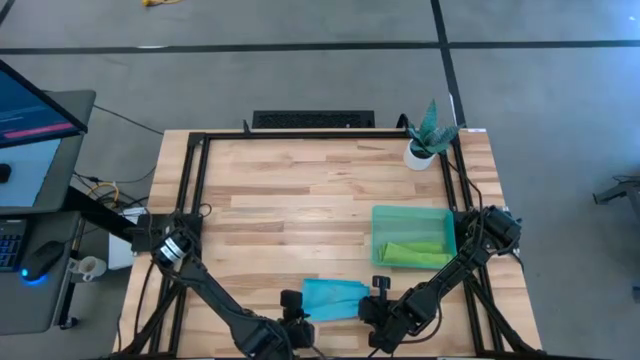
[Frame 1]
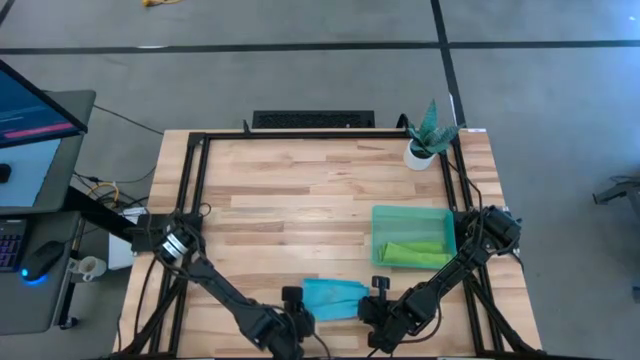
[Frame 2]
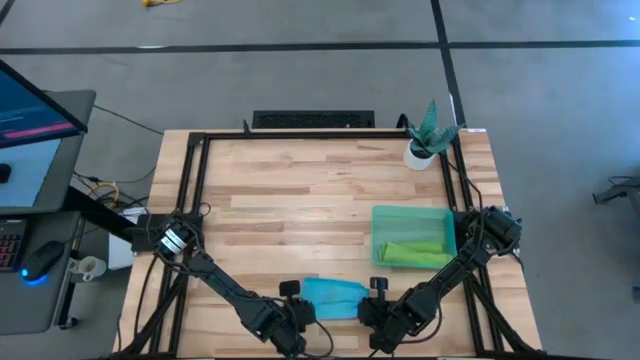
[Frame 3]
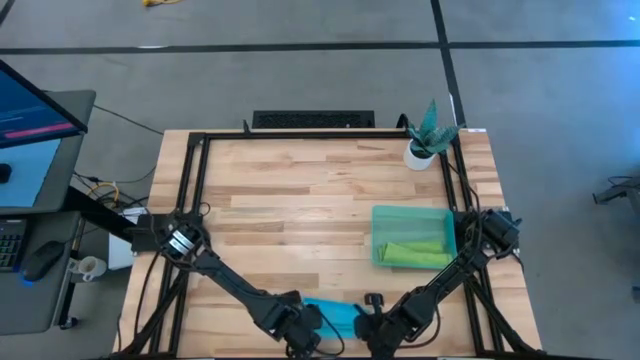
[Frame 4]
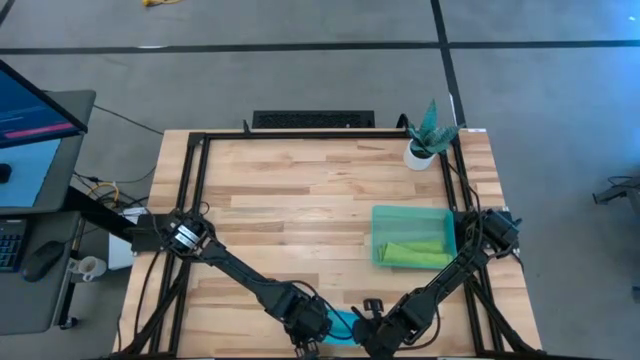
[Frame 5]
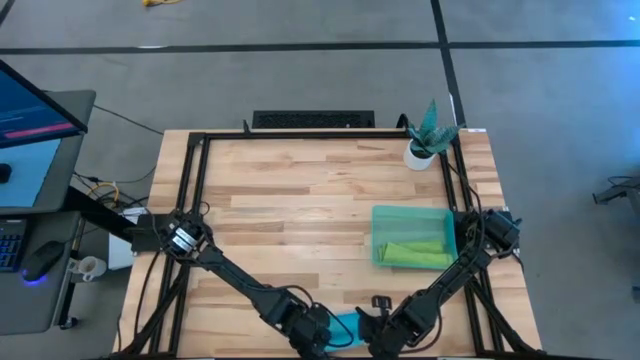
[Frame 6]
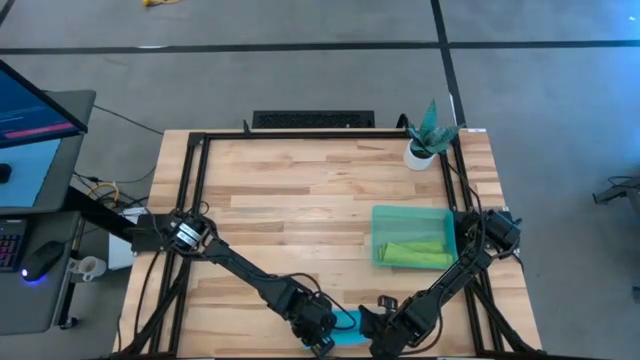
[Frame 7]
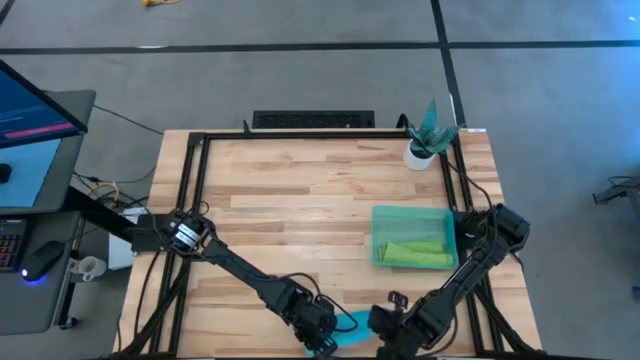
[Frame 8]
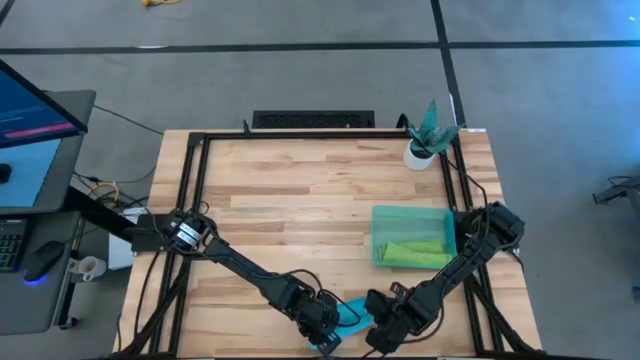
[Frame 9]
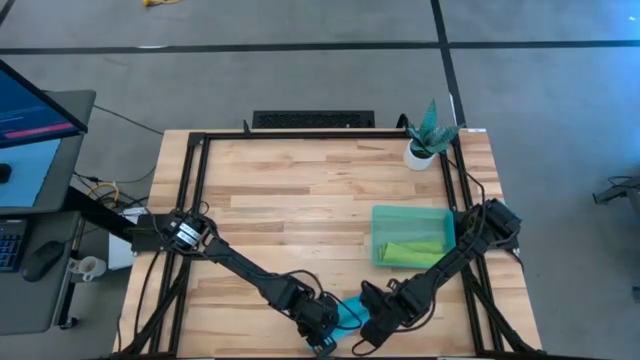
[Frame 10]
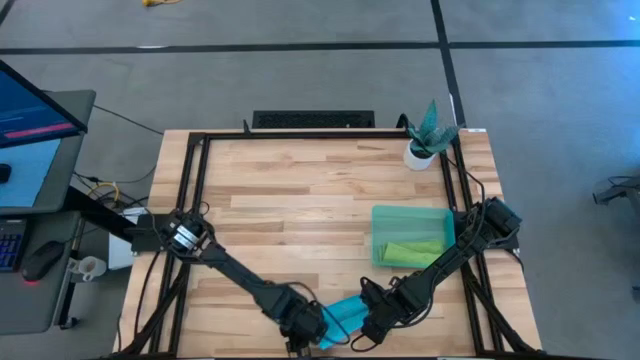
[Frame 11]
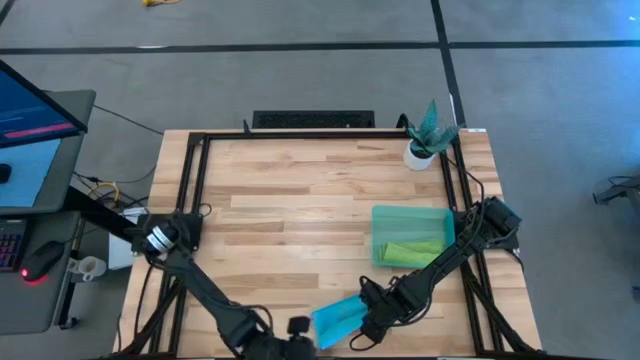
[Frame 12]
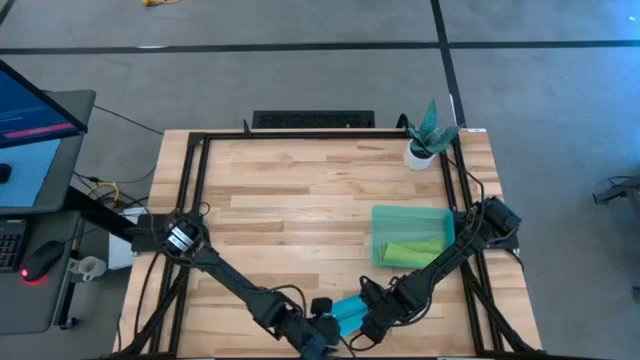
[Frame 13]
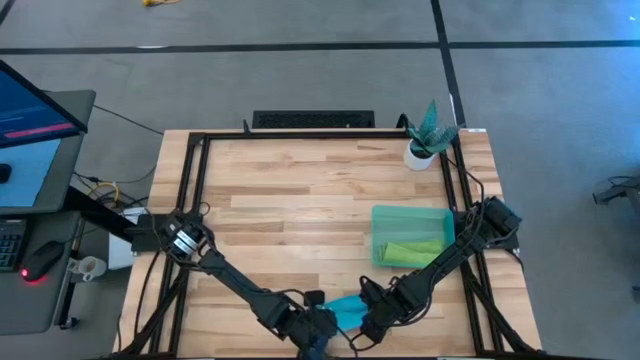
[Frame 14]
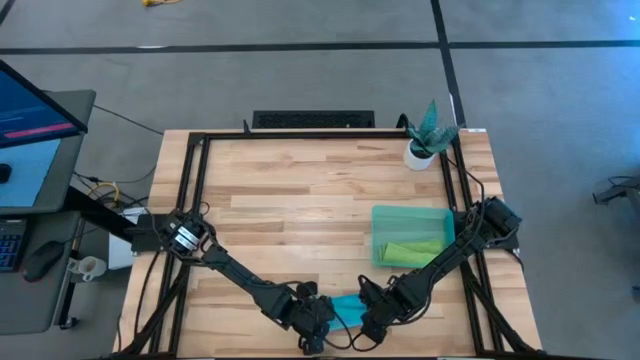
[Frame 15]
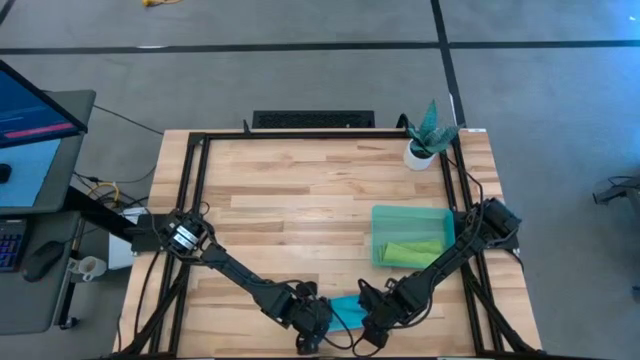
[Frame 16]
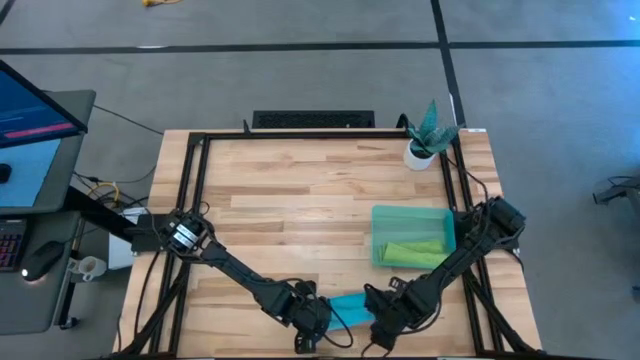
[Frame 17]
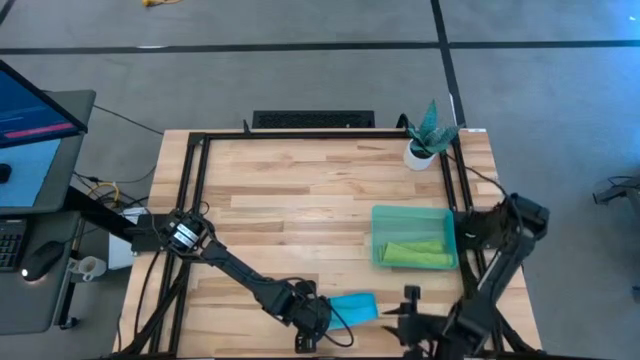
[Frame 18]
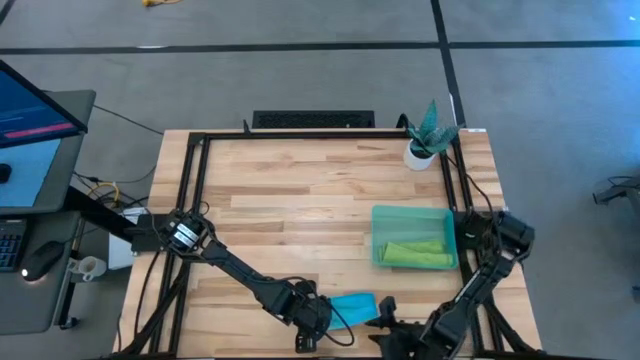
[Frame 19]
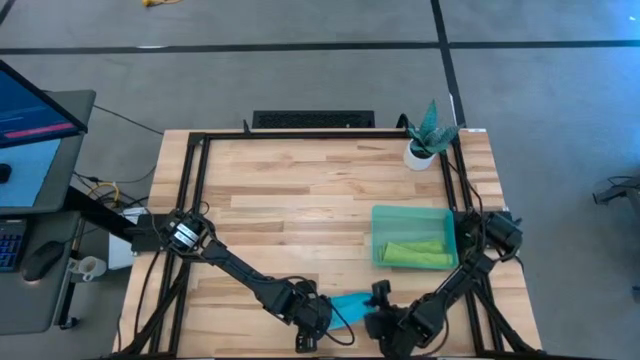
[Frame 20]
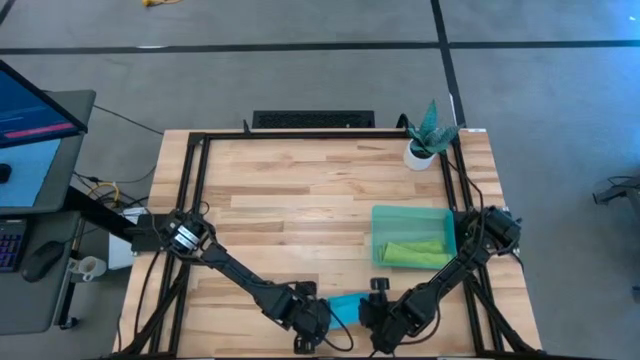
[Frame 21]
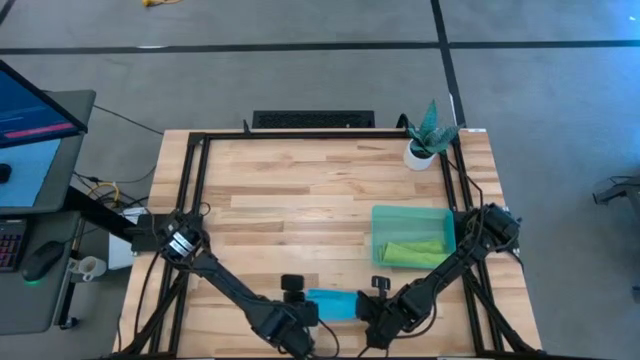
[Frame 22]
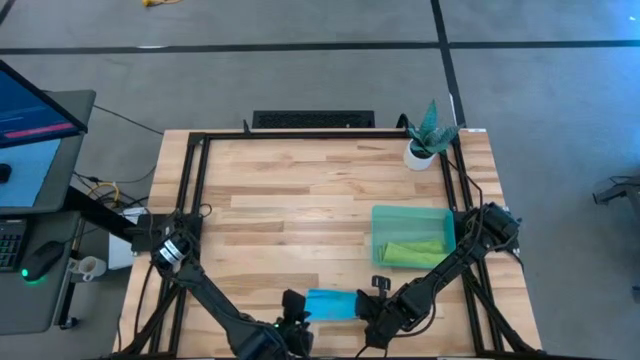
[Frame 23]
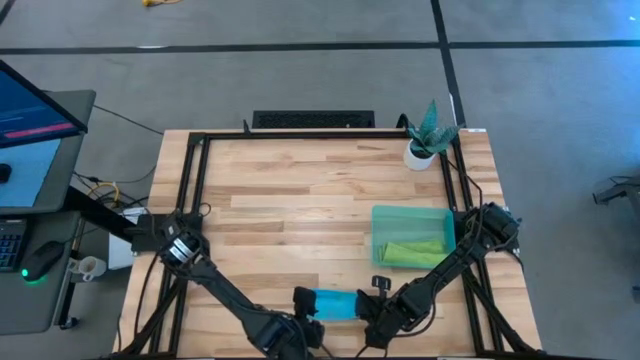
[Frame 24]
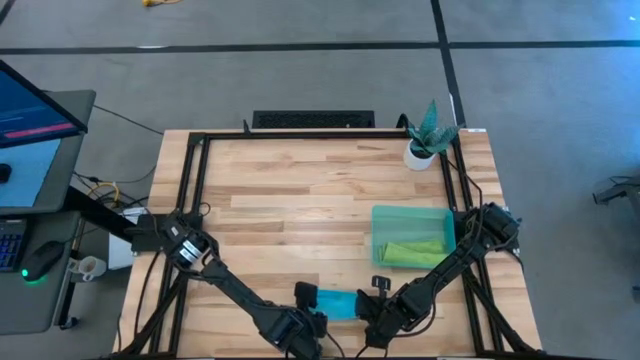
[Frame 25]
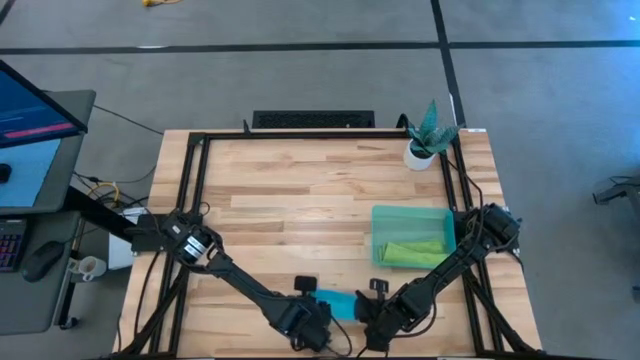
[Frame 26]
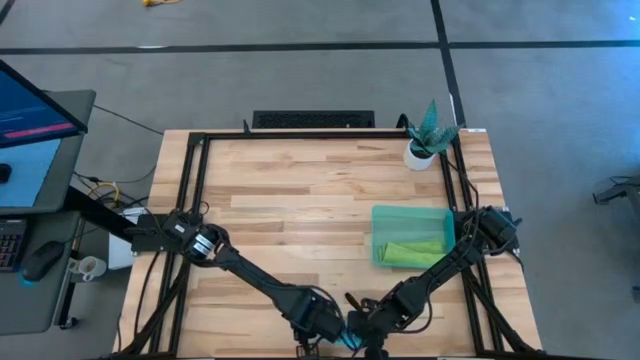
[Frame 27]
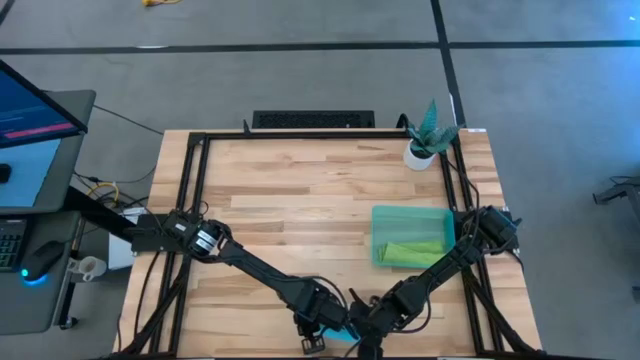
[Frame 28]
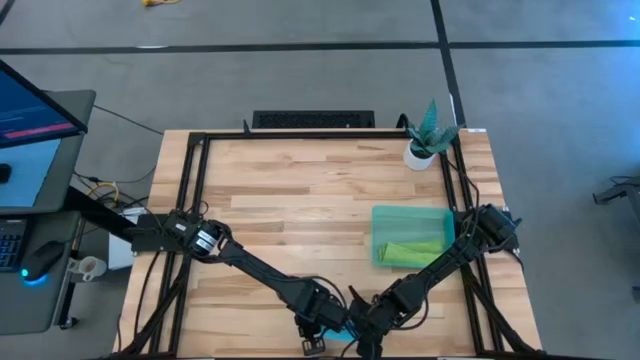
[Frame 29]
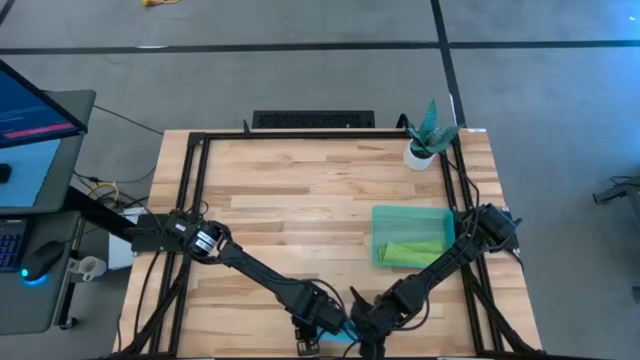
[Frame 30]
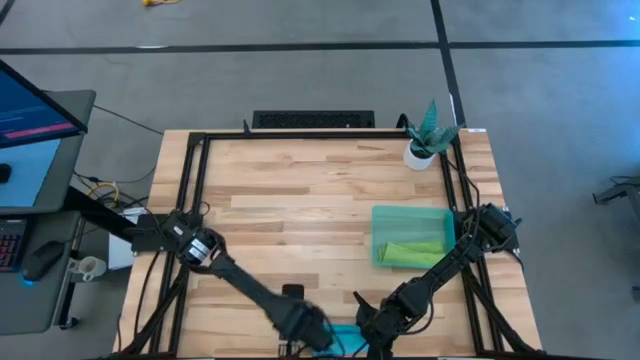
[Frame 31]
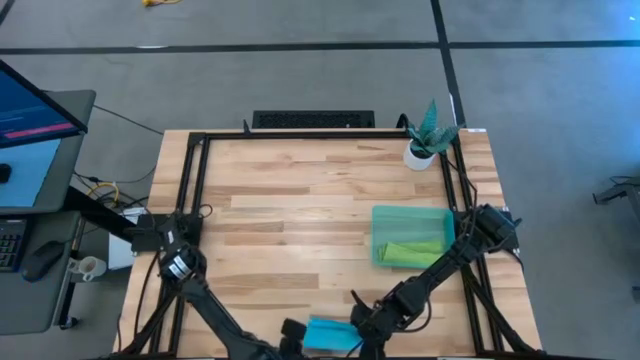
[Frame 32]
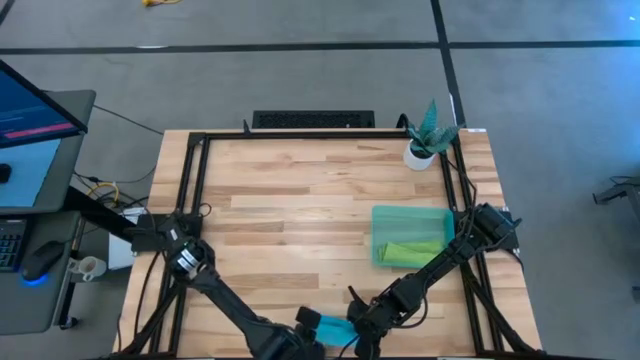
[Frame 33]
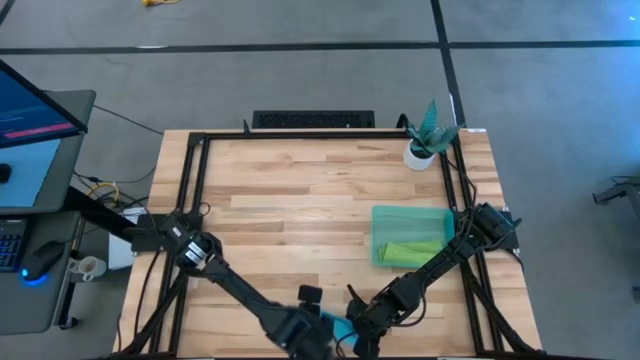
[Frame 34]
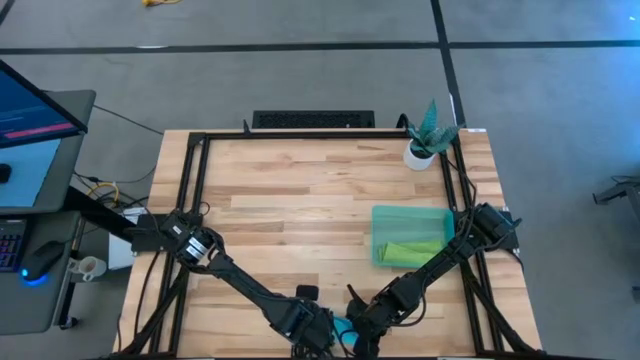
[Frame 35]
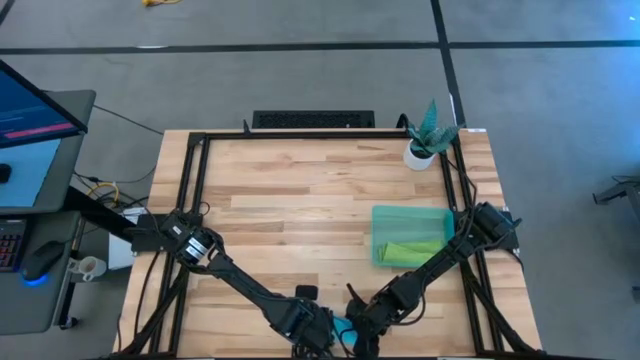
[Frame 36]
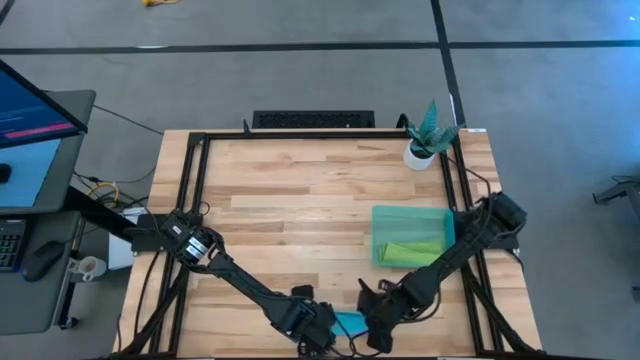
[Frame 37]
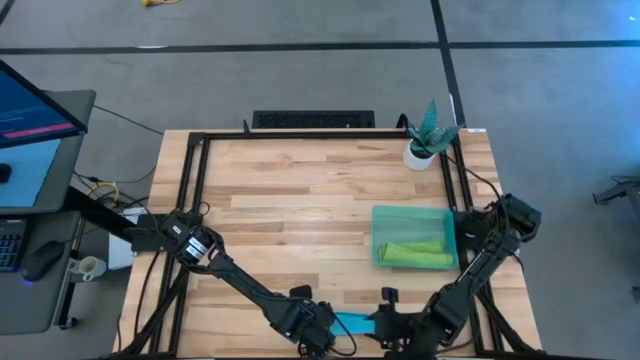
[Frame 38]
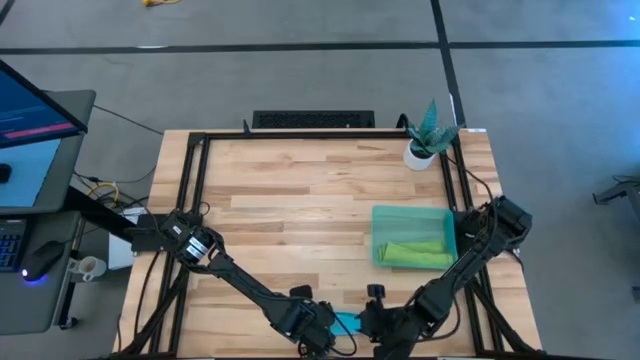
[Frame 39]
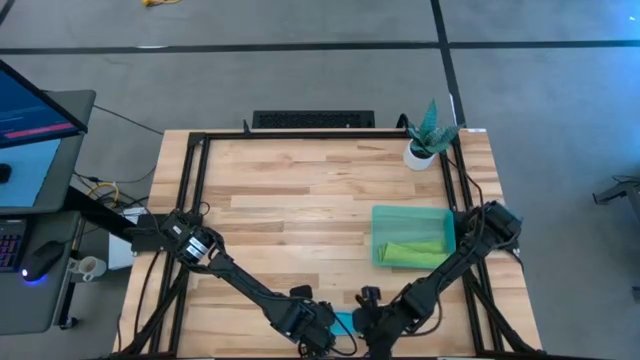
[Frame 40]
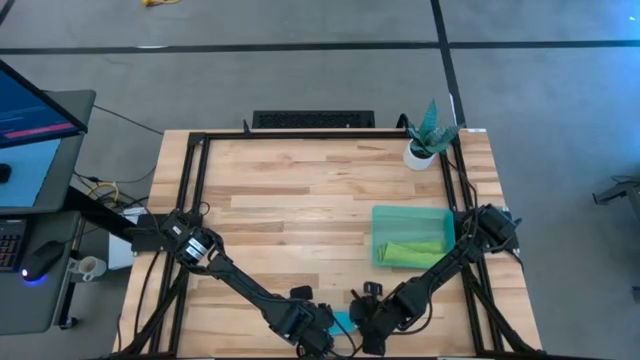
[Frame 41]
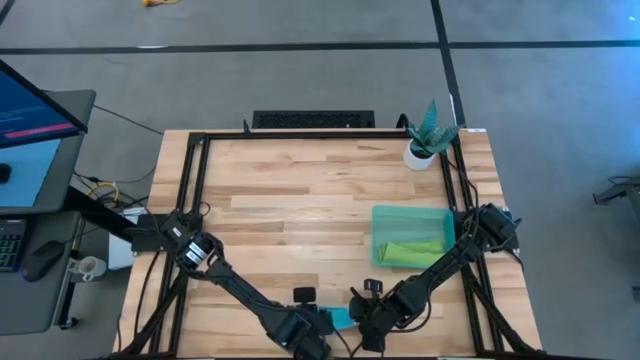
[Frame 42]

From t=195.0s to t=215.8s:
Task: Roll microfiber towels into tight, uniform cylinder then place into a basket
Roll the blue towel
